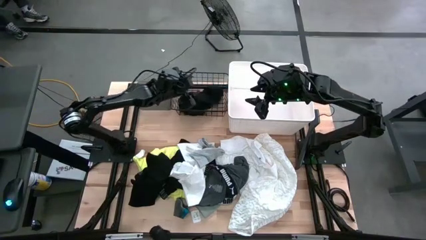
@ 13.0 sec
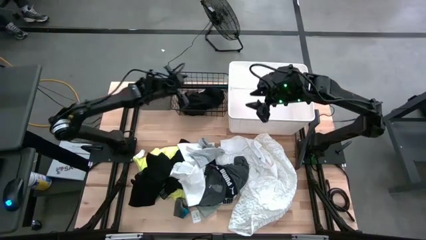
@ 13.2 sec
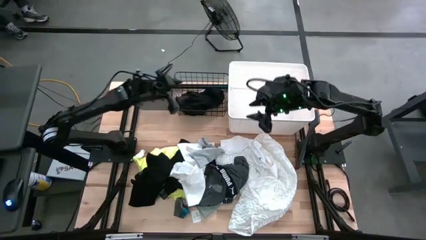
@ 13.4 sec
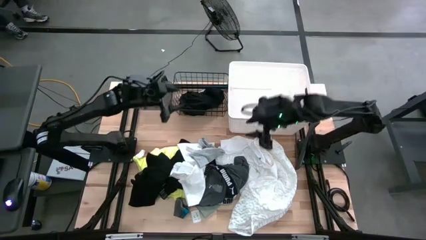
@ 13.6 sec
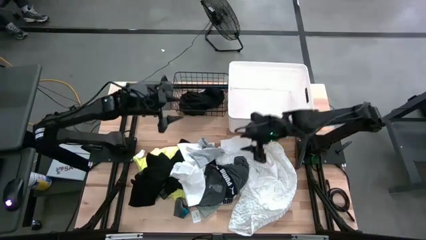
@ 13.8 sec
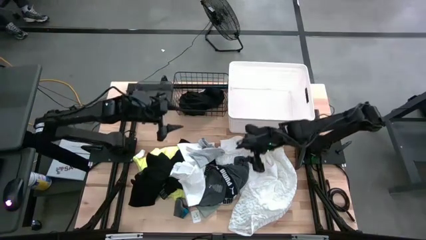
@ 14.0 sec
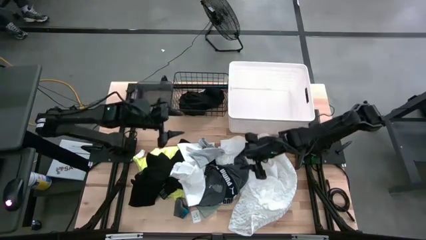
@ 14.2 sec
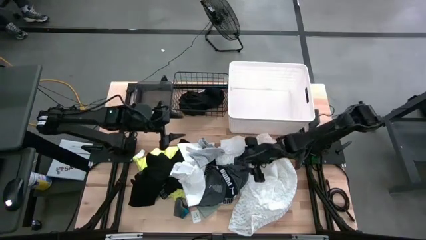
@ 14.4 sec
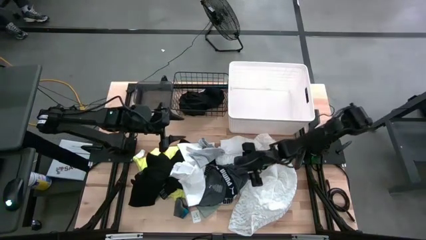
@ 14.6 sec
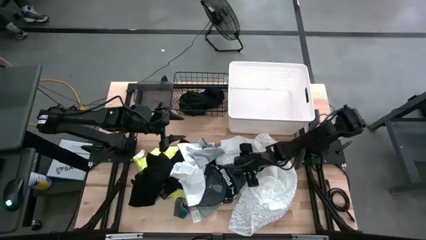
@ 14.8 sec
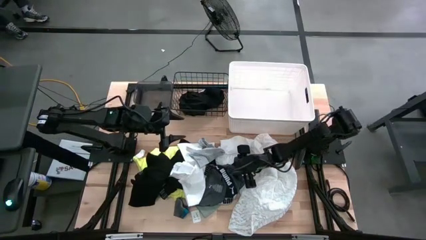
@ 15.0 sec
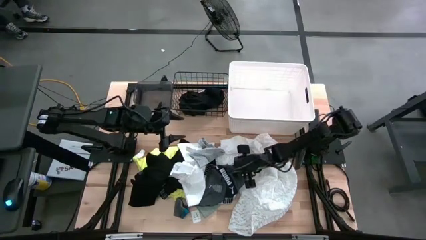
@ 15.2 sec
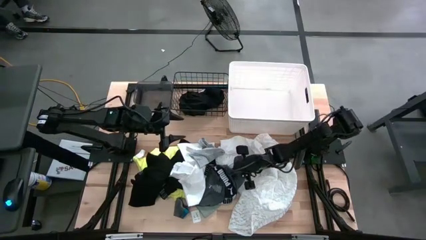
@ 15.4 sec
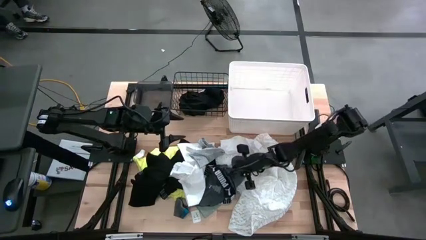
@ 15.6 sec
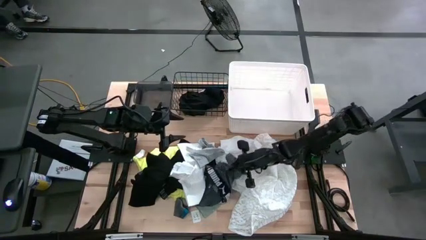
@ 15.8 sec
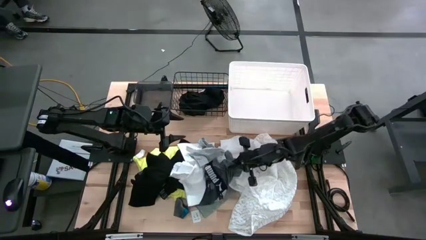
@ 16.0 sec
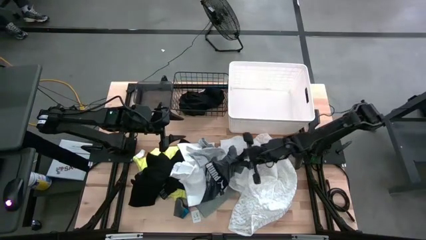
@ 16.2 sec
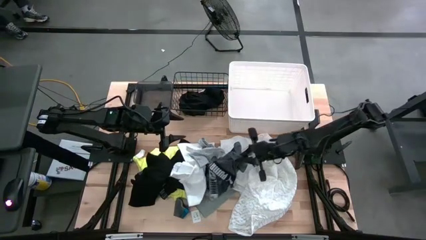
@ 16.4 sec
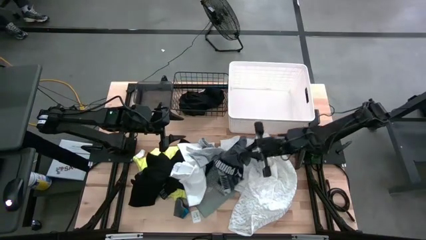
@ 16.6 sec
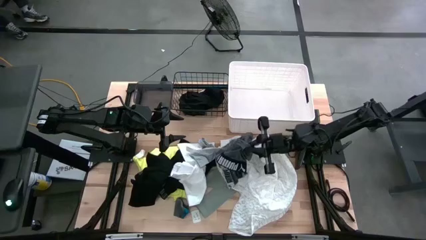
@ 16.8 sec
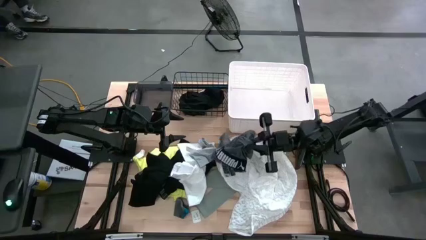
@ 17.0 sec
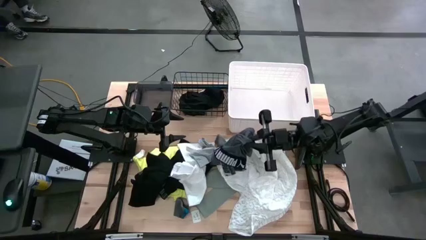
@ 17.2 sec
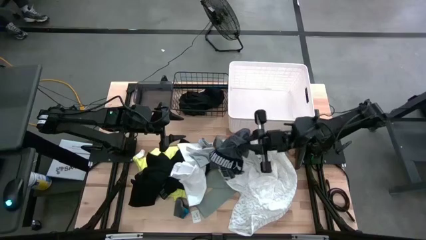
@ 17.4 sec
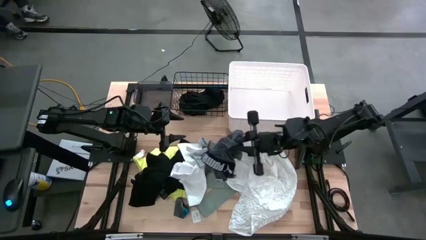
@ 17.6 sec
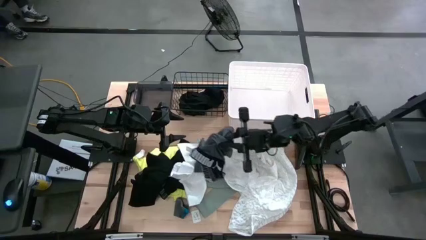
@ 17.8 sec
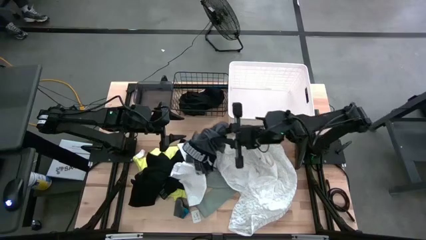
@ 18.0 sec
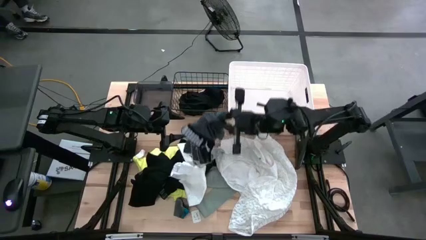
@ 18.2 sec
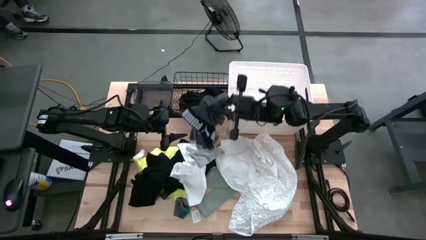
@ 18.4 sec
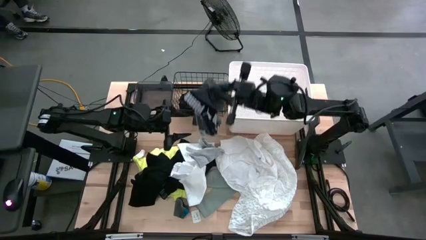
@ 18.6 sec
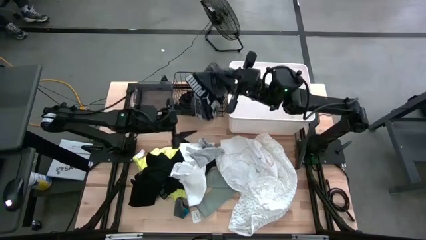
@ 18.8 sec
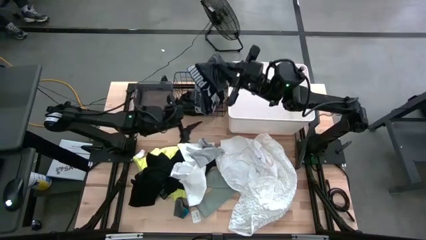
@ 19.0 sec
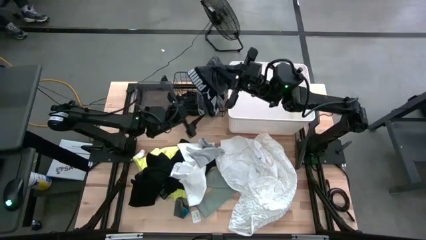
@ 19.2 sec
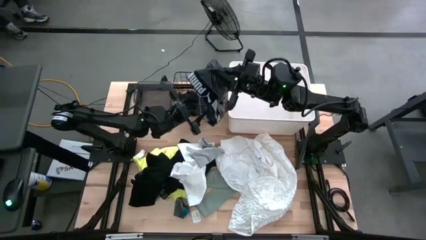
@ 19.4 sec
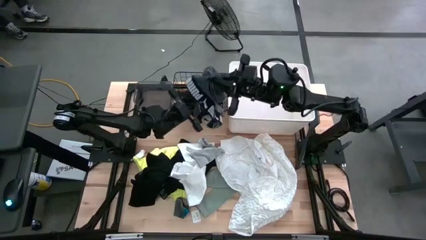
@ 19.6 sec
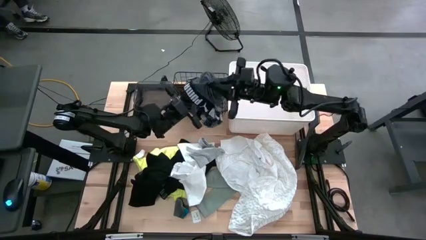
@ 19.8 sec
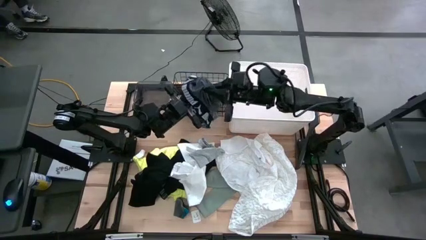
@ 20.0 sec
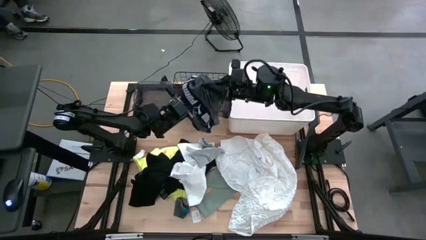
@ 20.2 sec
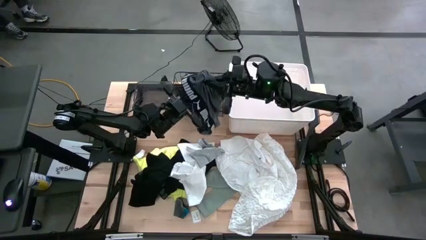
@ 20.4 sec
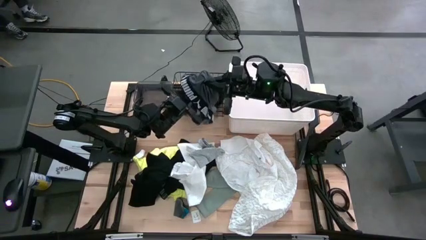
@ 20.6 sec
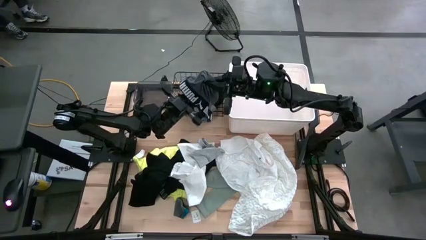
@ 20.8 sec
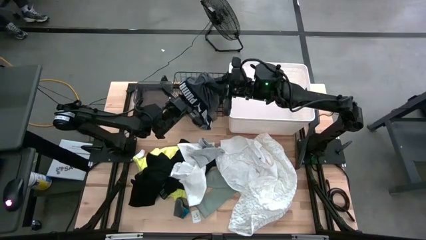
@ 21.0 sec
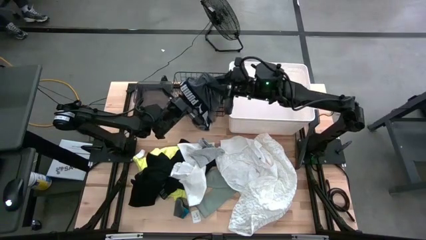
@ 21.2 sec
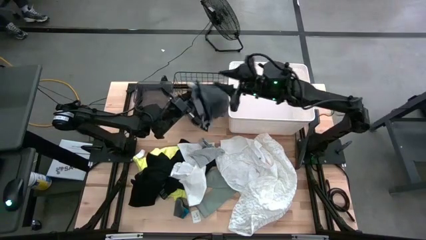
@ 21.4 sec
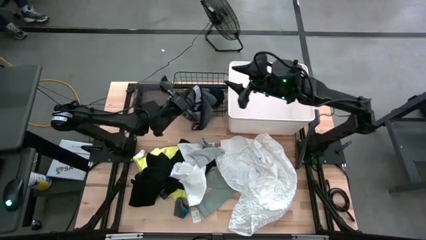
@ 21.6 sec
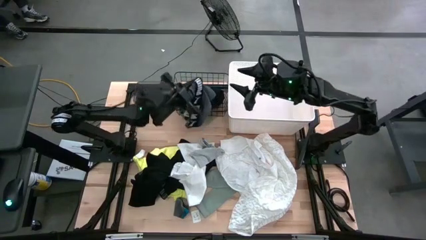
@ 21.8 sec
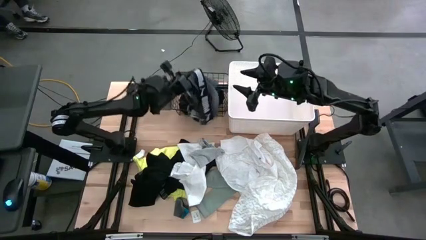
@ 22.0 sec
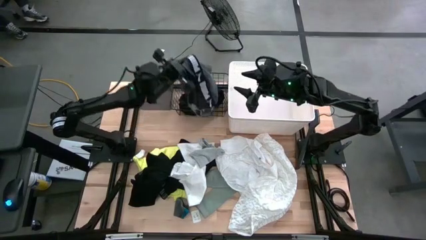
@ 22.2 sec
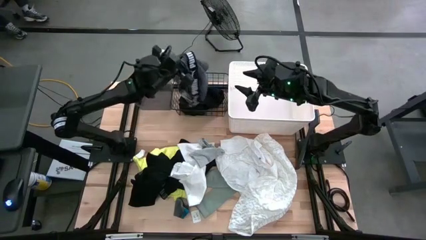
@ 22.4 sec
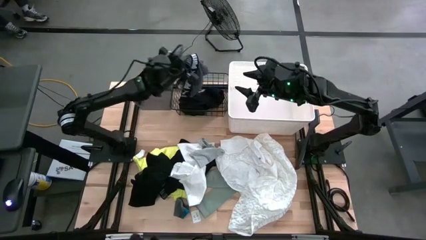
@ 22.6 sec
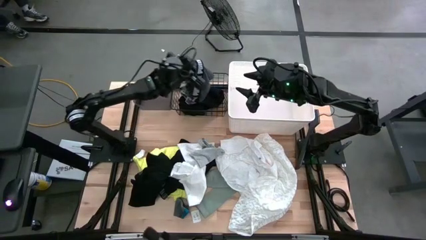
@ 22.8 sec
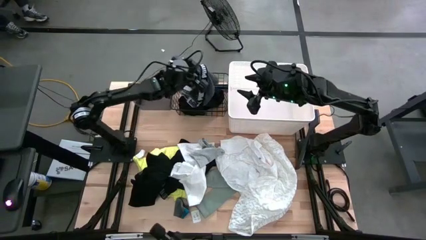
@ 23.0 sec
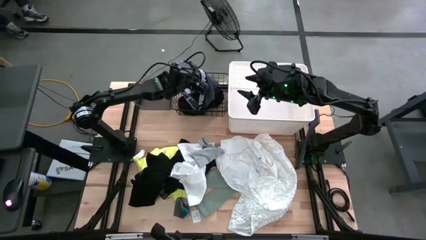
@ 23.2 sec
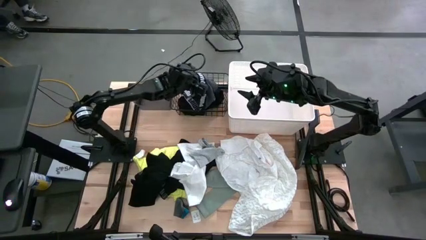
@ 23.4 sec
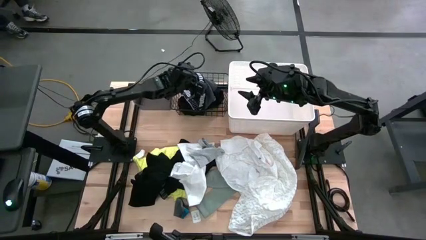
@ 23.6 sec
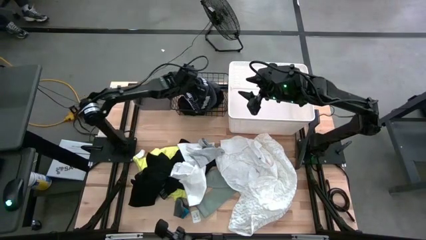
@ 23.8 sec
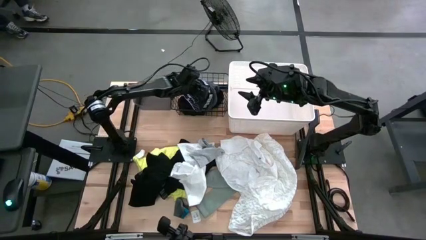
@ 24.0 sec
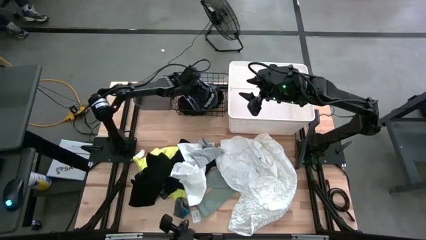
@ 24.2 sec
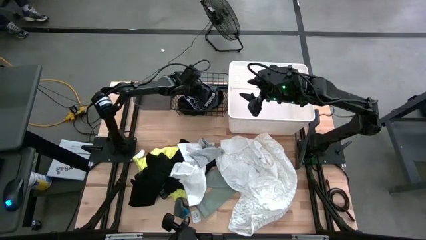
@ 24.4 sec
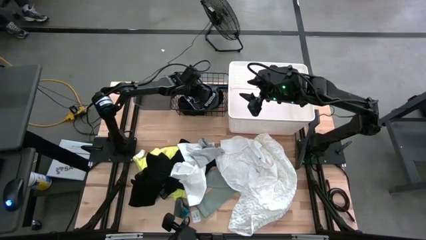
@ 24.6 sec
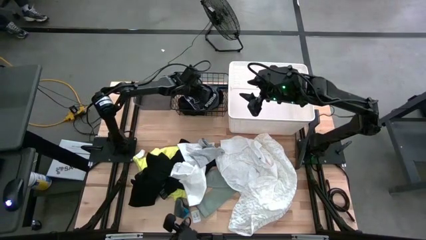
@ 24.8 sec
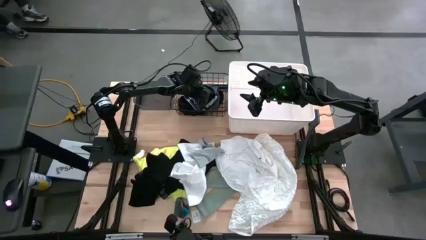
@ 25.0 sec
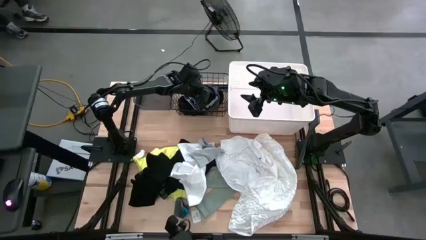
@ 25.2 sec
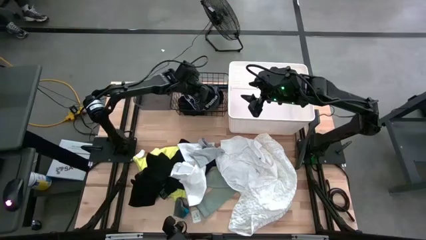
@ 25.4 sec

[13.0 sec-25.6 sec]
Task: Pick & Place Cloths
Put the gray underwear into the wire basket

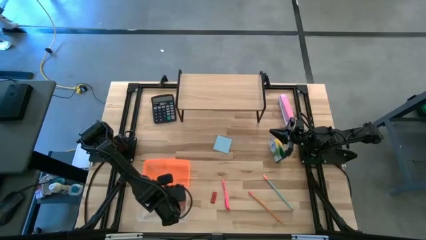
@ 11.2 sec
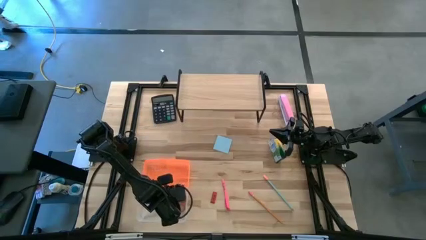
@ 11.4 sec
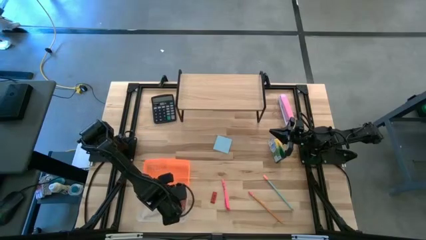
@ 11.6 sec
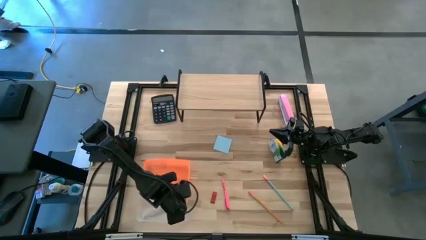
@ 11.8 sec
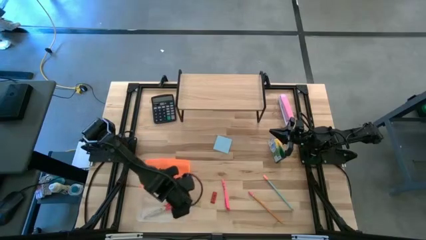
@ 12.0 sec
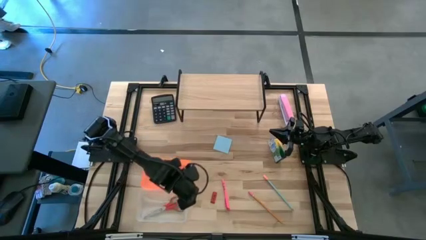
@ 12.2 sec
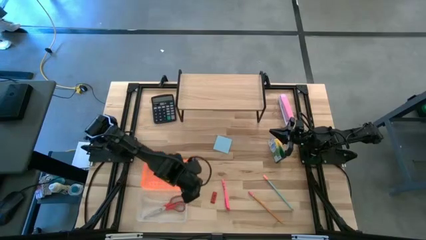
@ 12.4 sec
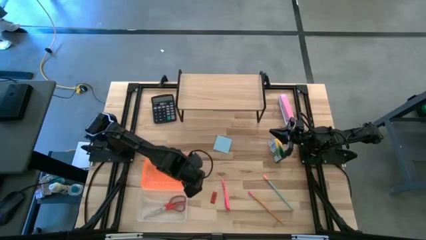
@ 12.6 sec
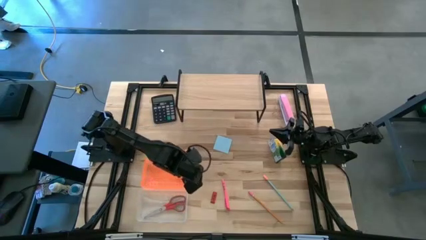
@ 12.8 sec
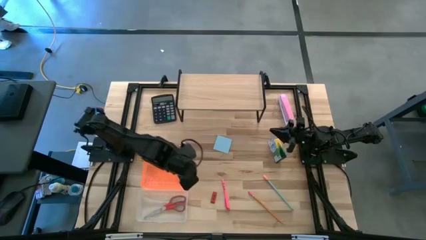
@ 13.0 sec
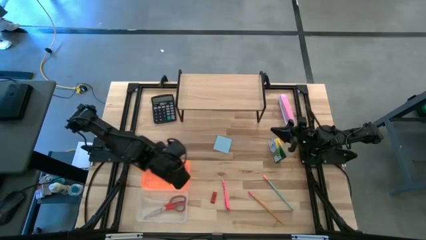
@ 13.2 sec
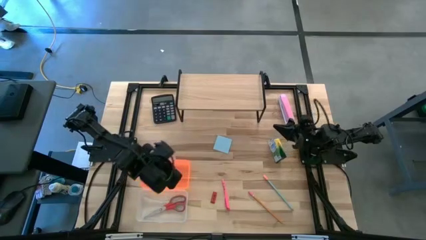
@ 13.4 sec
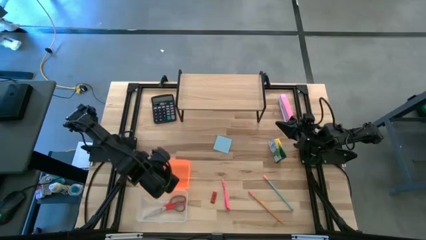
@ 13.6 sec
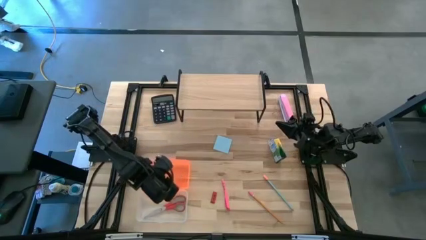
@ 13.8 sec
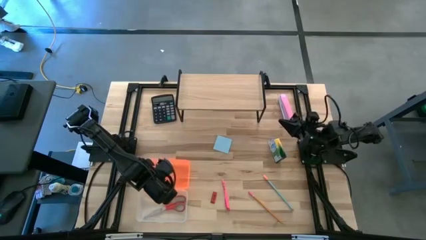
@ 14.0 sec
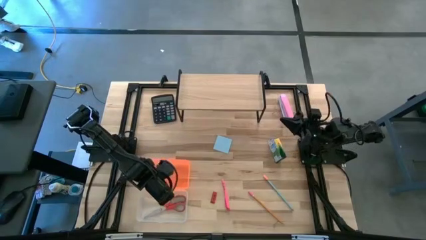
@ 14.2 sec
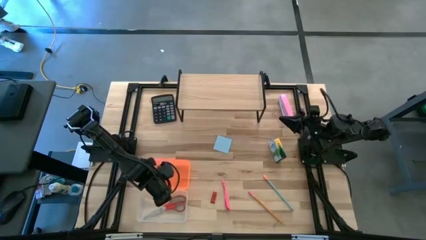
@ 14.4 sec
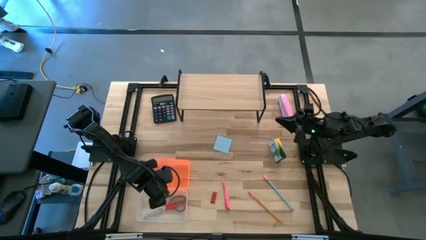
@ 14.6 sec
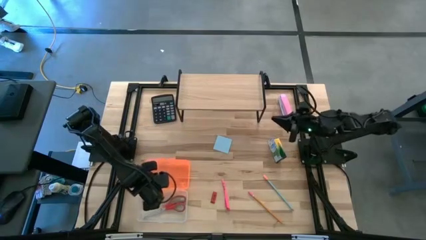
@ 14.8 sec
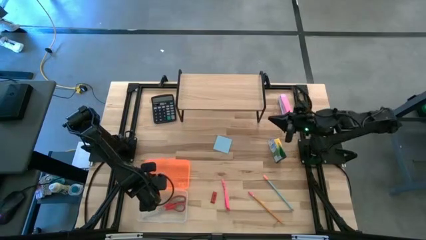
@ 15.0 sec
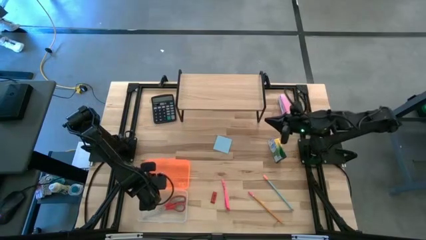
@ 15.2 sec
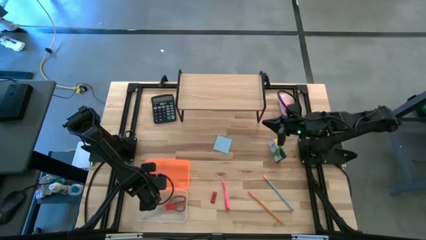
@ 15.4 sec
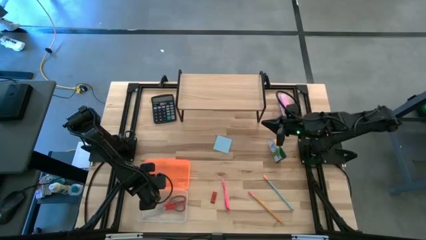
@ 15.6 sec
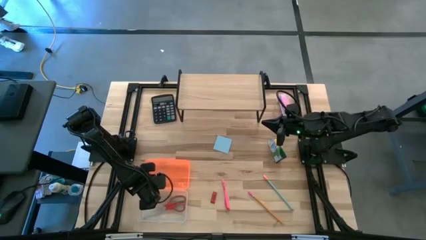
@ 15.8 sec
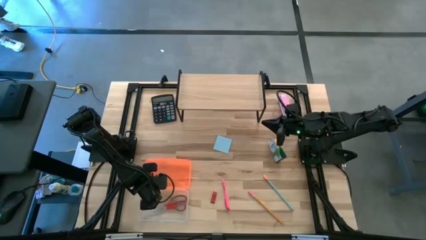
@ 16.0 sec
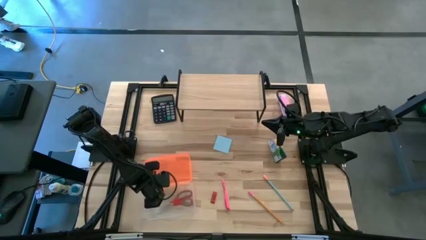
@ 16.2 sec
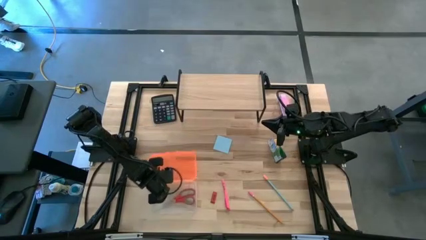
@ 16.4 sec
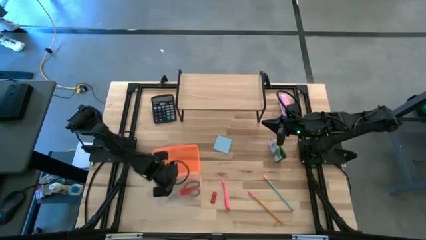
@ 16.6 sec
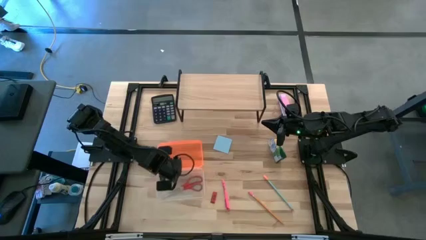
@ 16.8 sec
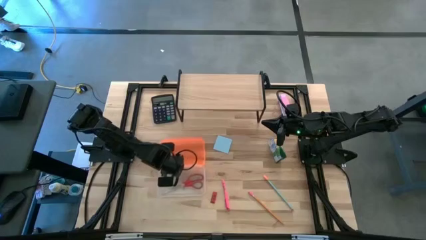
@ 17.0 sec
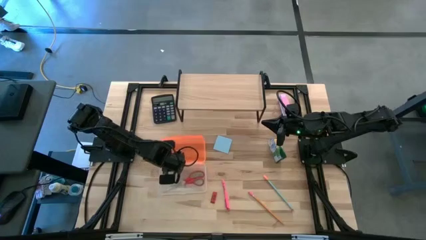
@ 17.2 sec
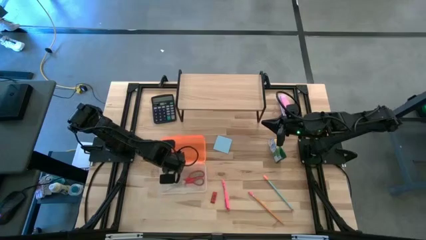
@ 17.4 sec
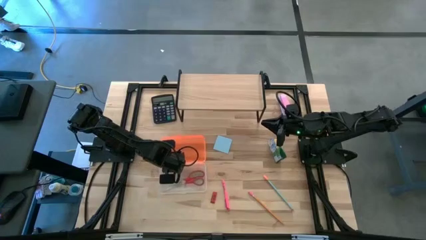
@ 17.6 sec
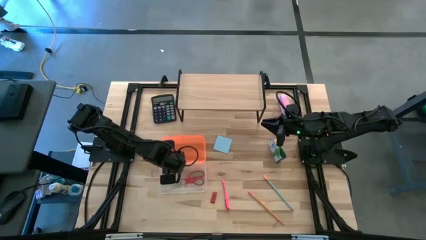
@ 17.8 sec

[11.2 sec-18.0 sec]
Task: Pack school essentials
Move the supply box to the middle left of the table
